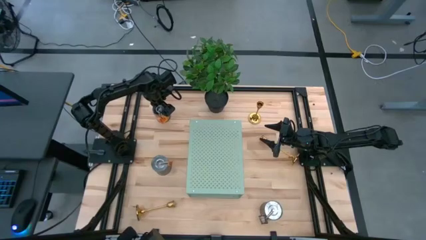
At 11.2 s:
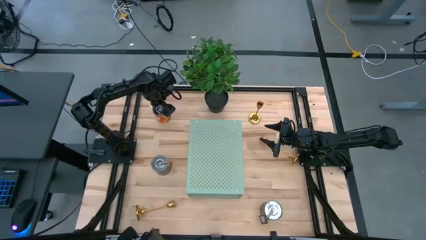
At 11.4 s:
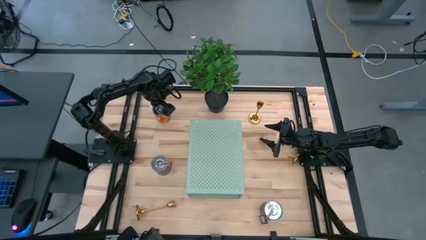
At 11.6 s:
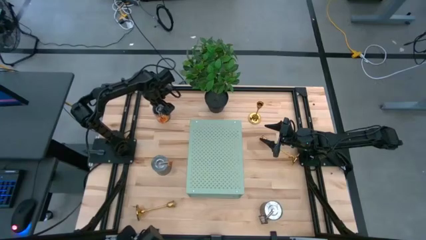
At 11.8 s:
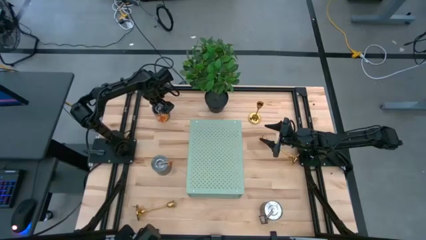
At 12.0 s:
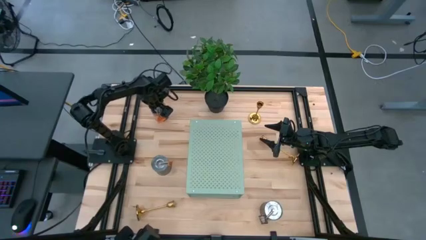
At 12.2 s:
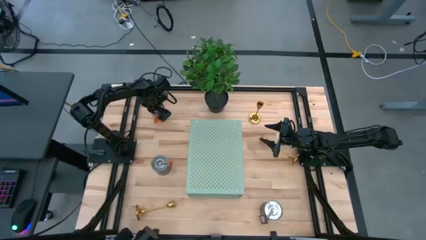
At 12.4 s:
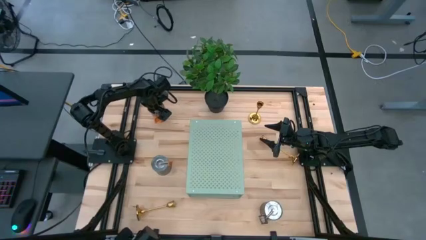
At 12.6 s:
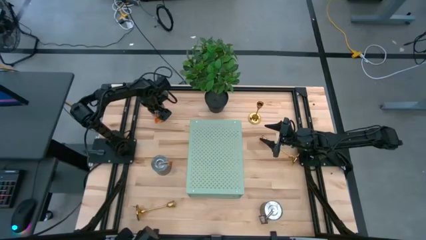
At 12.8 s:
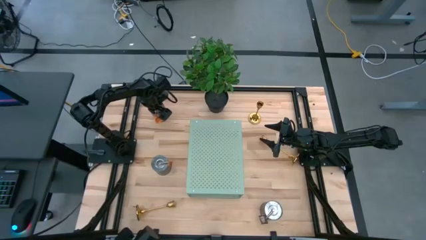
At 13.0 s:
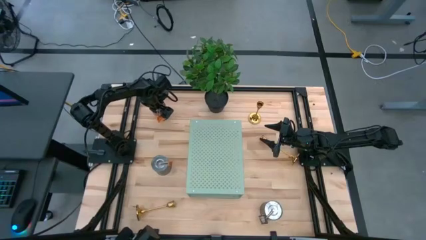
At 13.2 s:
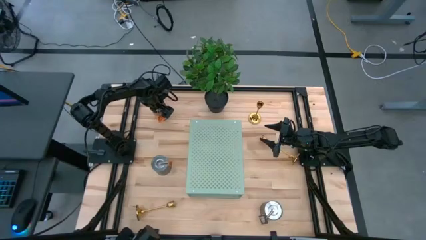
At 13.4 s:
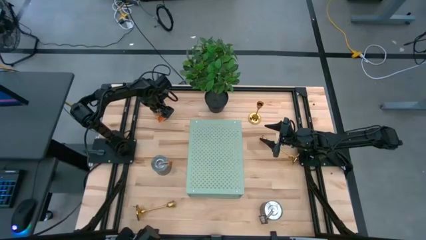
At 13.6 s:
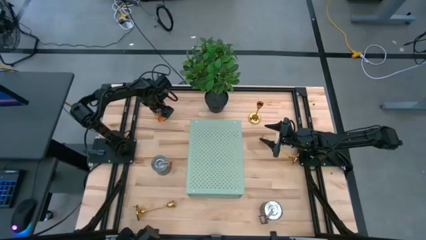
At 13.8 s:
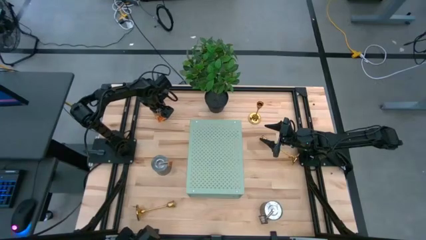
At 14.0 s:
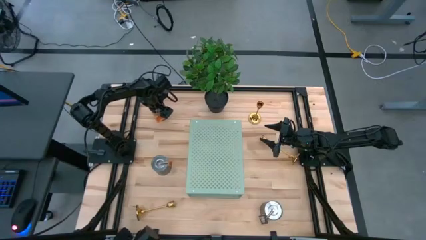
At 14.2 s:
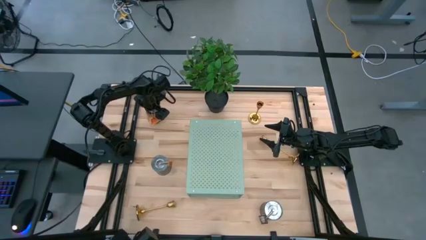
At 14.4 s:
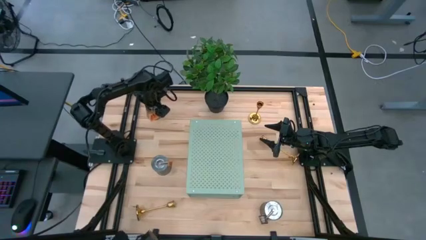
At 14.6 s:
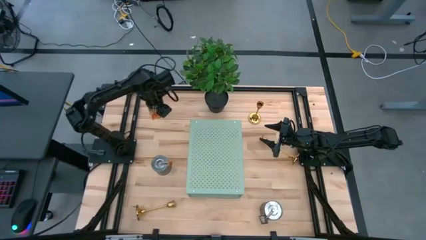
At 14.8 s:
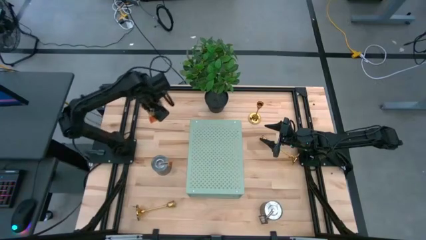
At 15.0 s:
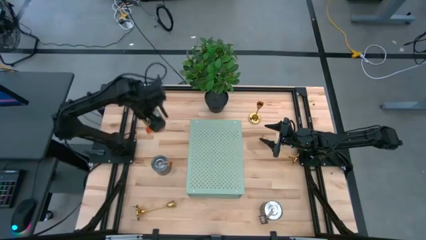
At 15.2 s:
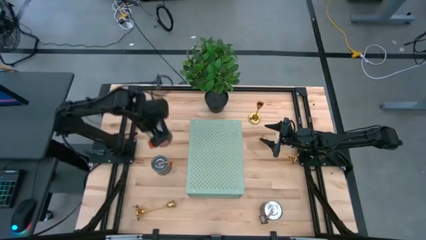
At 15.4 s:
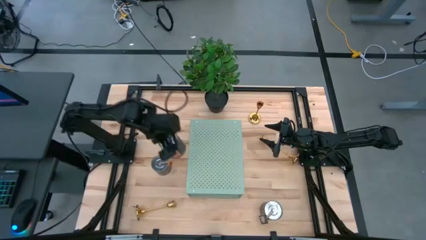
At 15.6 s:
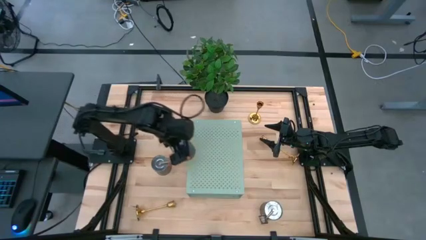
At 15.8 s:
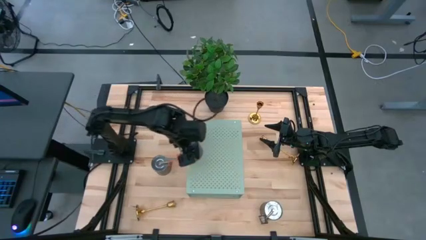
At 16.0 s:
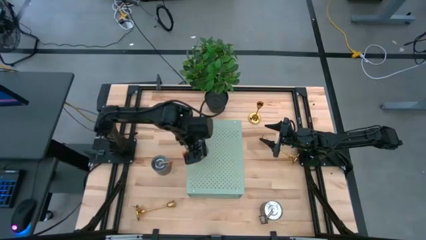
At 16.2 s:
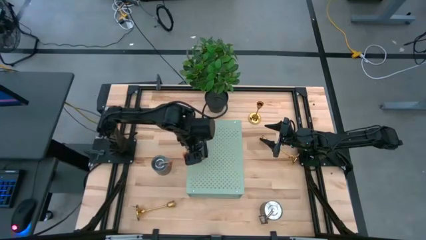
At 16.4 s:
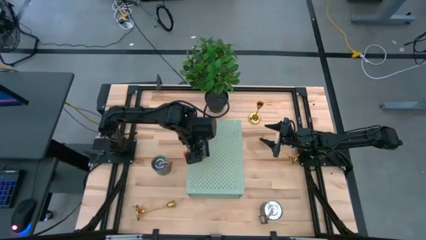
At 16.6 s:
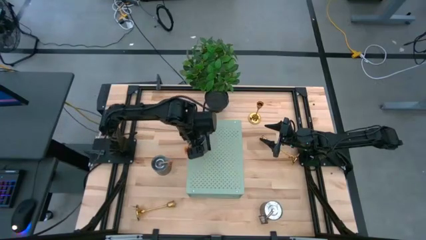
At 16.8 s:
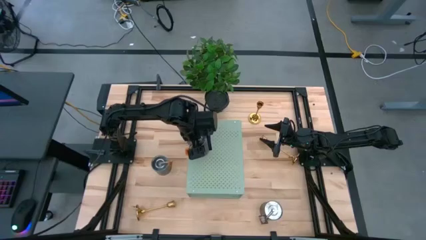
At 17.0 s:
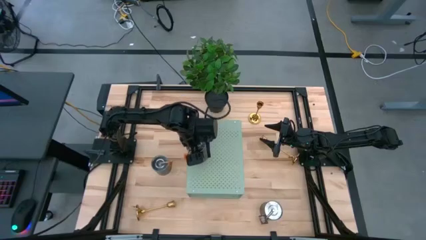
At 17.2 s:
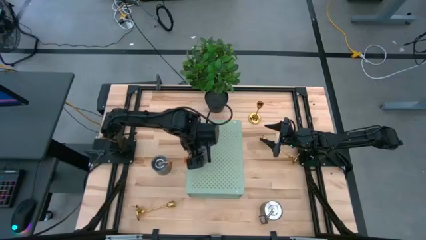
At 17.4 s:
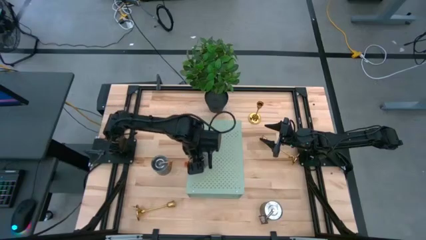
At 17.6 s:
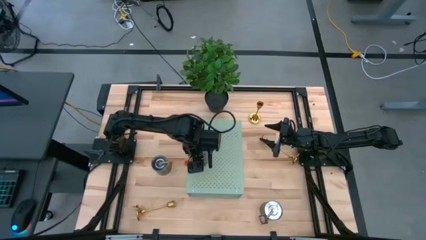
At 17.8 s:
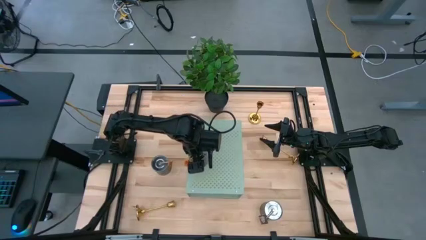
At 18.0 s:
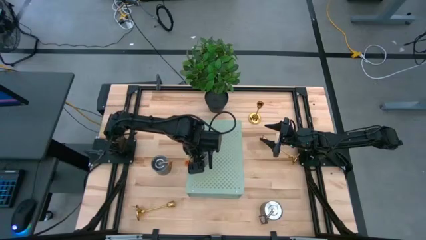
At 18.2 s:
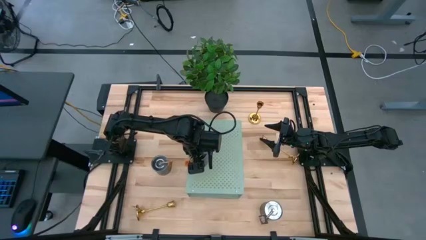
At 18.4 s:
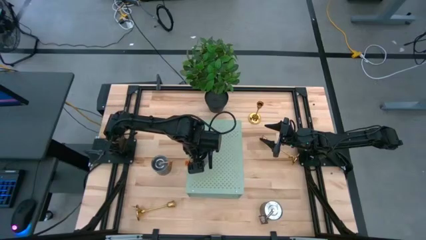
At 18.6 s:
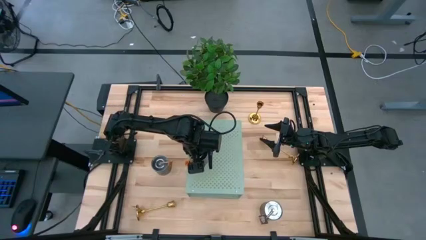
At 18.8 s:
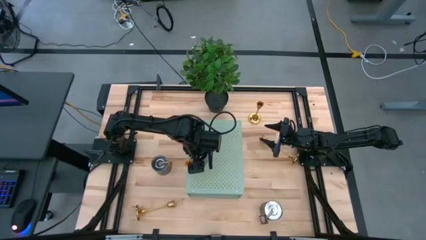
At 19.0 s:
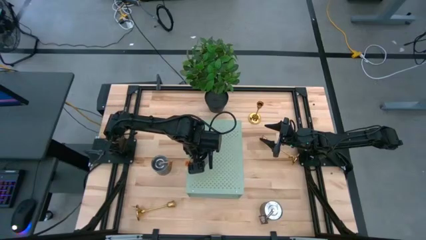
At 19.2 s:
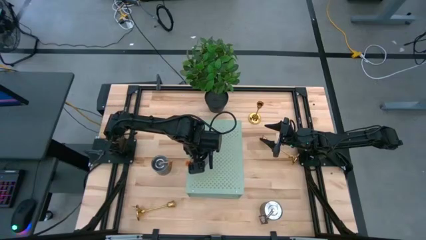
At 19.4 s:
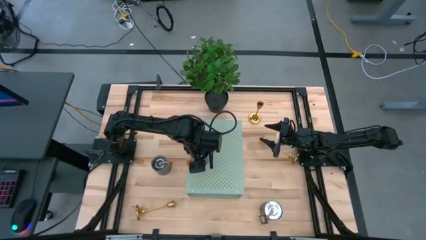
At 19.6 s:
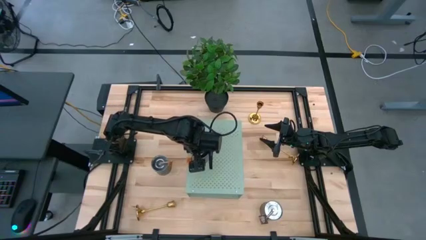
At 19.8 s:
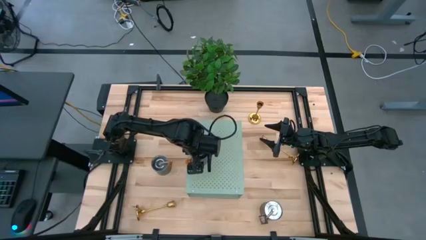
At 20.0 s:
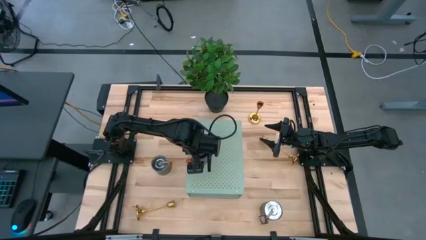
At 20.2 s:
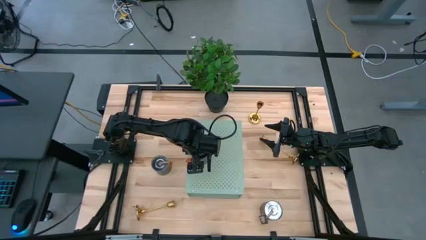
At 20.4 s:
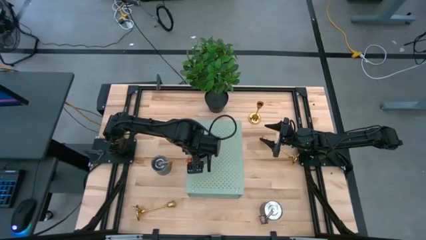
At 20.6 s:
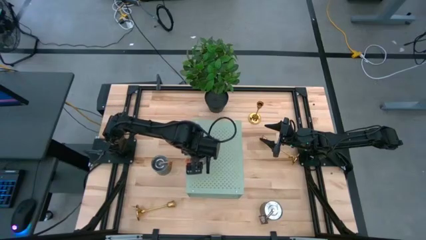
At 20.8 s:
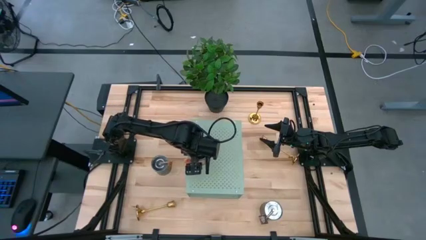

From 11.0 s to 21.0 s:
Task: Pick & Place candle stick holders
Put the top orange scented candle on the shelf
